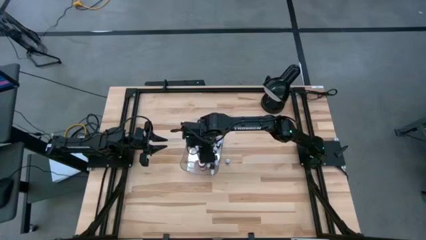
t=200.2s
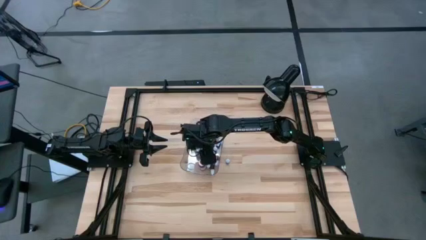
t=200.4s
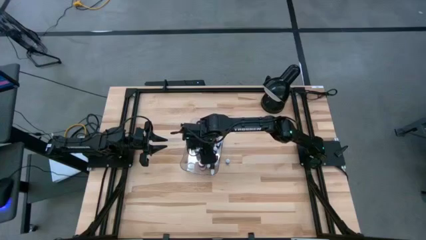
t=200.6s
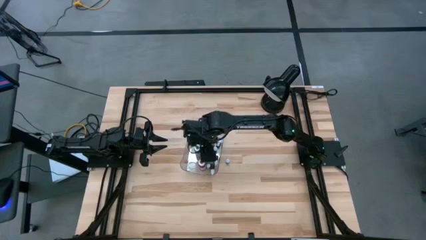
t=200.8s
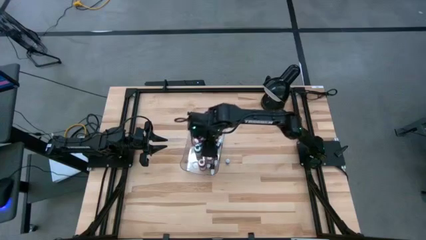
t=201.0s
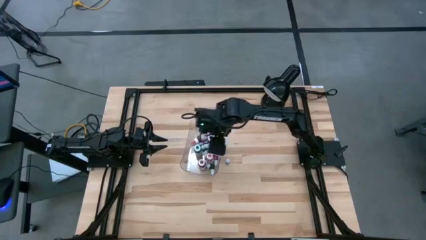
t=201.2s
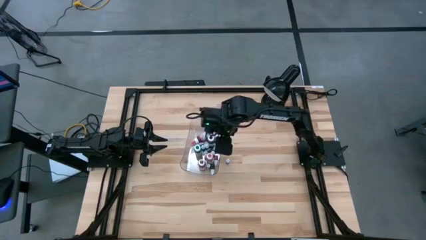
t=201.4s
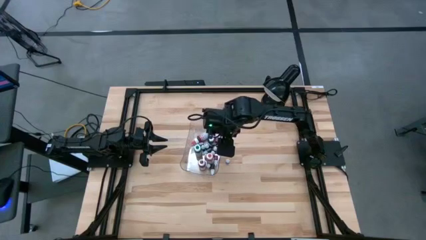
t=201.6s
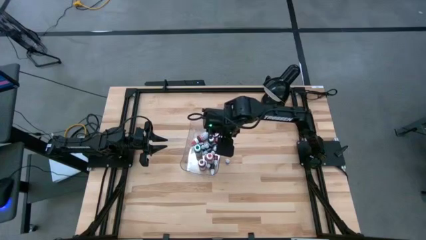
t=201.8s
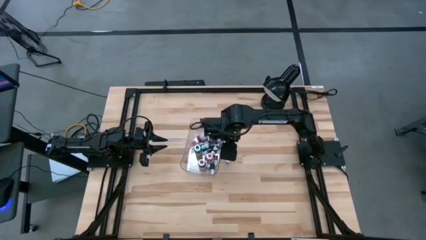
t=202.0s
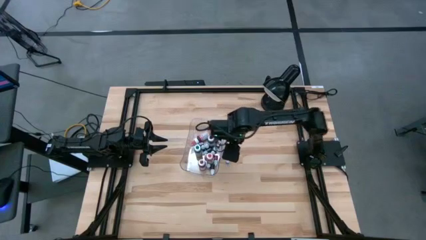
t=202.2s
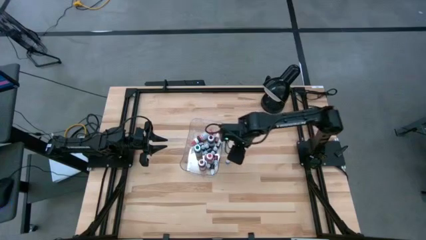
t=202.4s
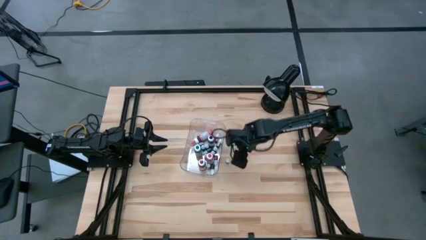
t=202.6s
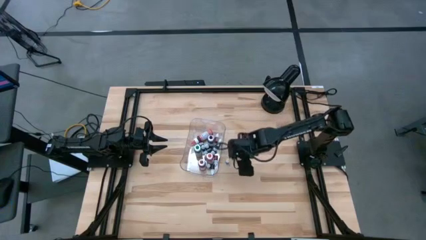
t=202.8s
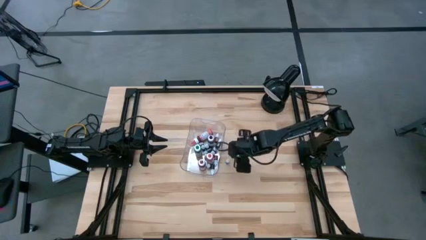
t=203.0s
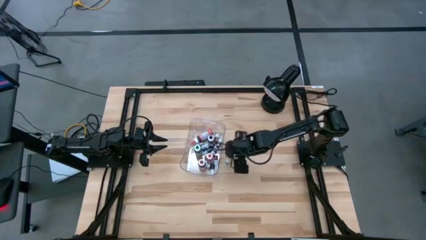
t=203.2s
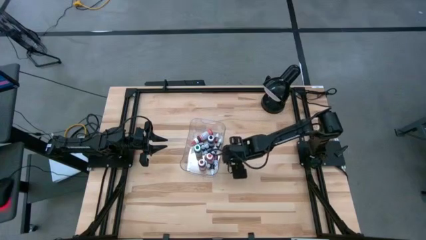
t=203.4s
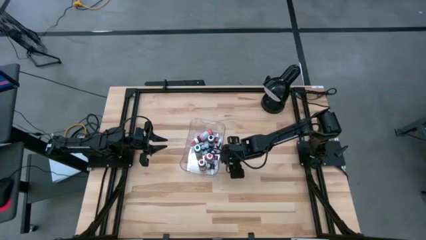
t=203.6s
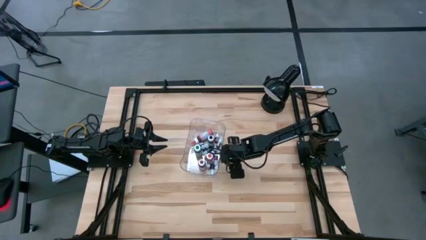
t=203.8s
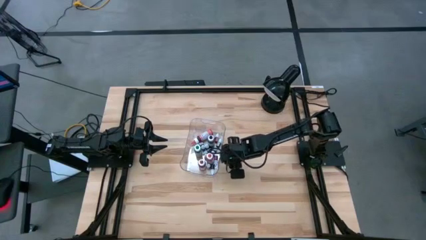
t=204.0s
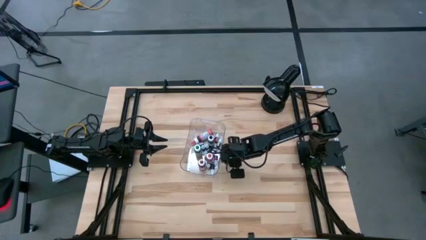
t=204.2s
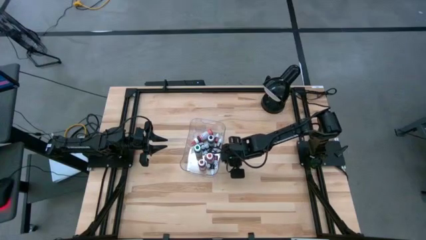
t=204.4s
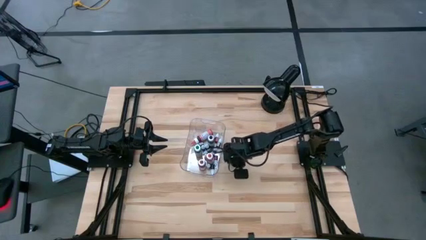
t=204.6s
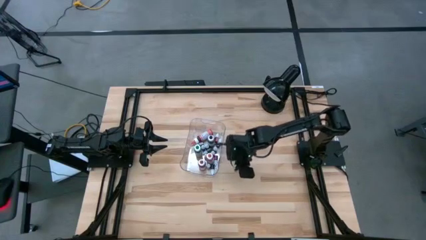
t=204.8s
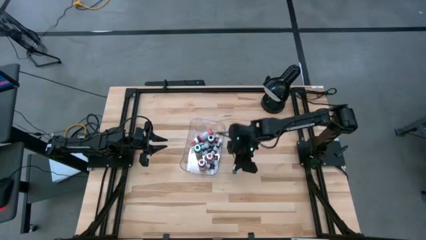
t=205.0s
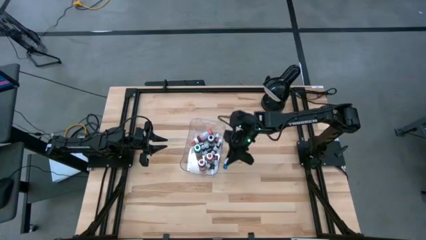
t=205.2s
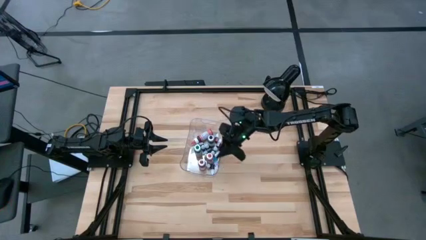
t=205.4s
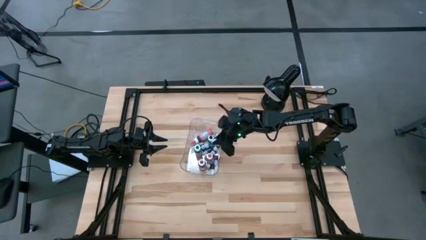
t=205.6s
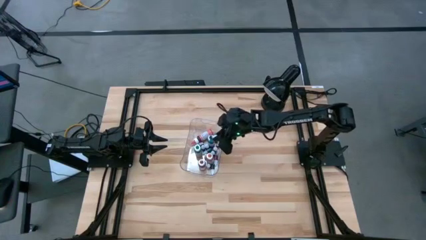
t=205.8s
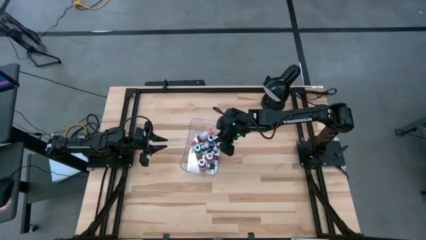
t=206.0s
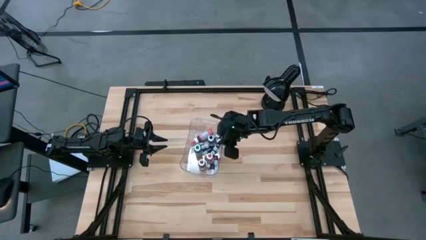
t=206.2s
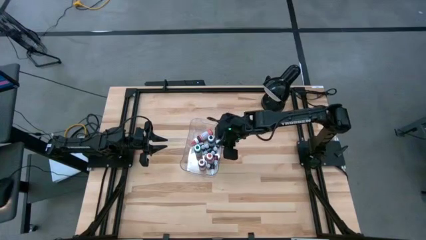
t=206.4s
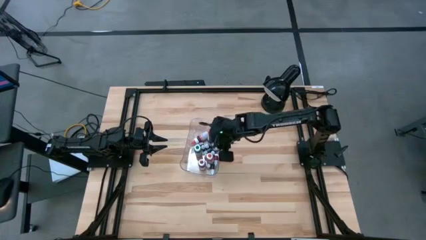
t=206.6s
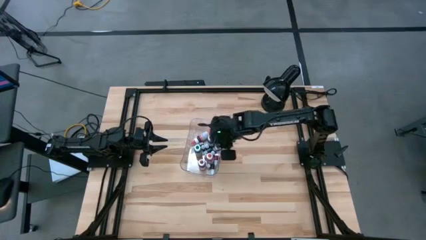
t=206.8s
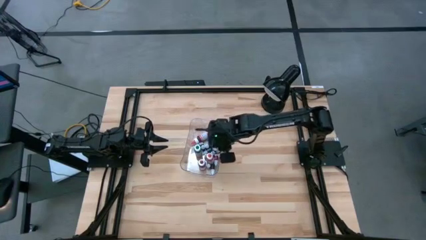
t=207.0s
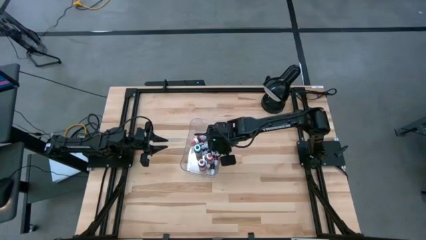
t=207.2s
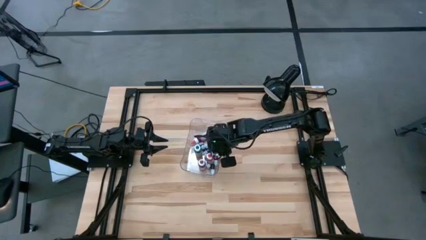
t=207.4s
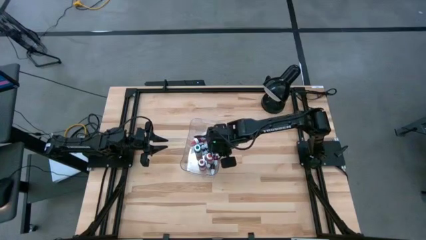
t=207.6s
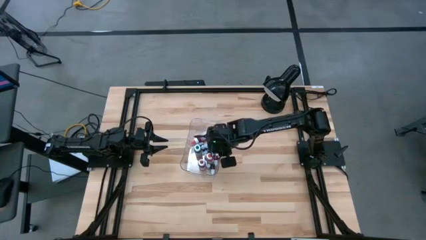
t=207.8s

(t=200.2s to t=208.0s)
Task: Pick & Place food coloring
Put the small blue food coloring bottle into the transparent bin

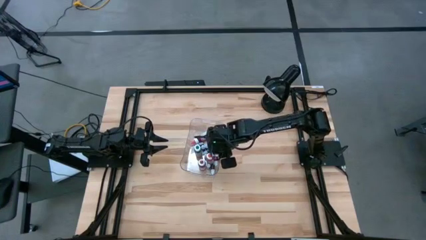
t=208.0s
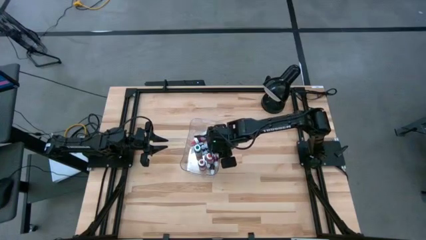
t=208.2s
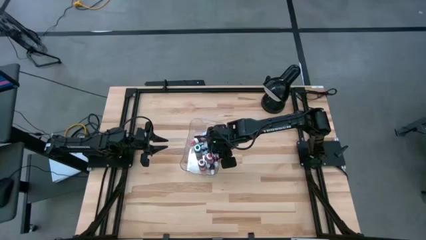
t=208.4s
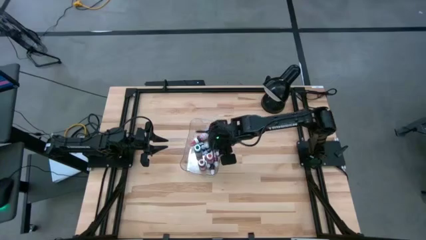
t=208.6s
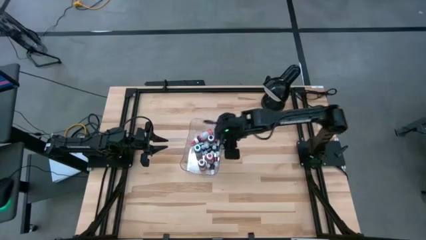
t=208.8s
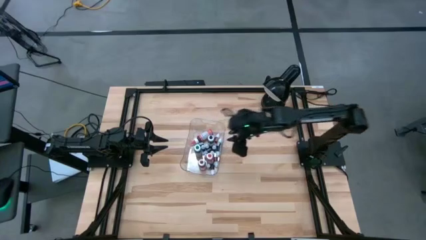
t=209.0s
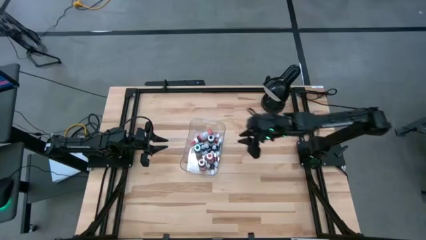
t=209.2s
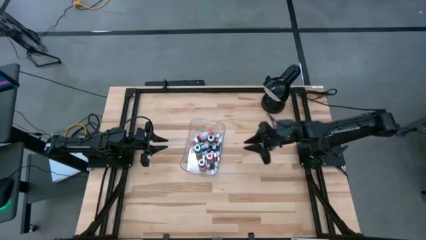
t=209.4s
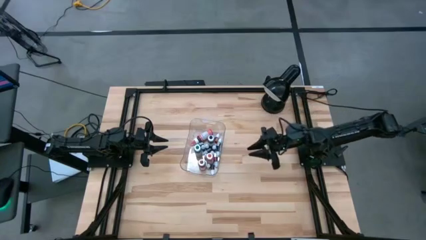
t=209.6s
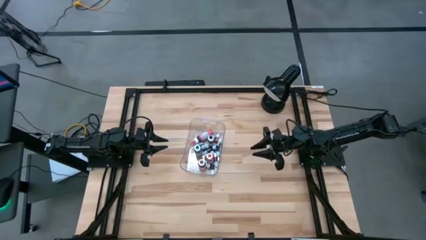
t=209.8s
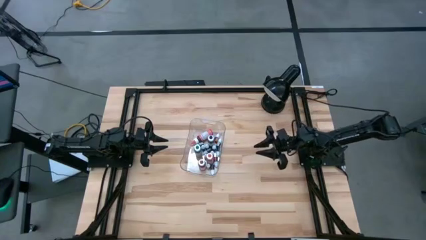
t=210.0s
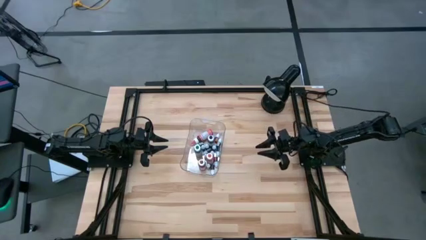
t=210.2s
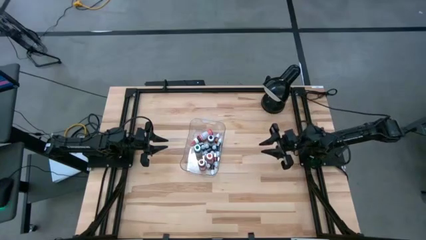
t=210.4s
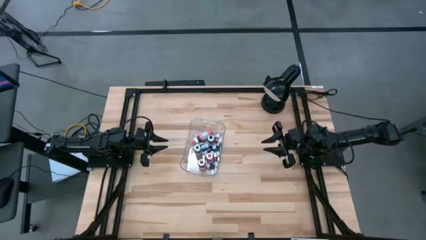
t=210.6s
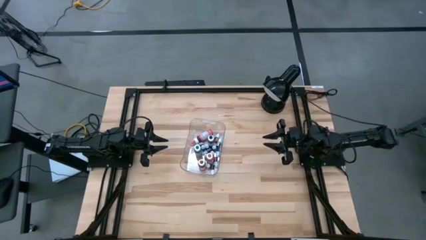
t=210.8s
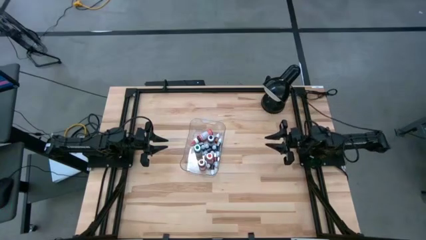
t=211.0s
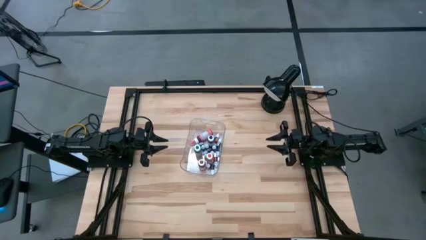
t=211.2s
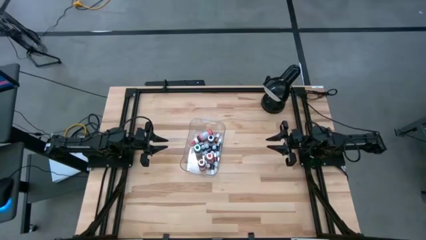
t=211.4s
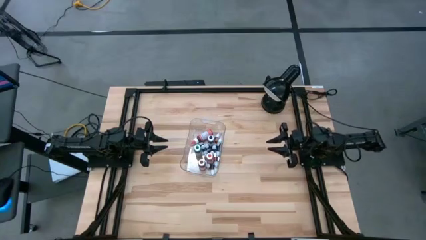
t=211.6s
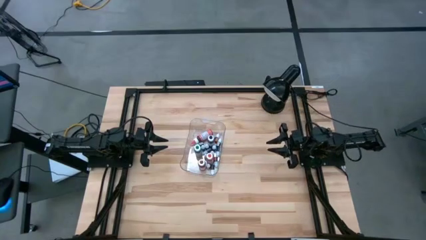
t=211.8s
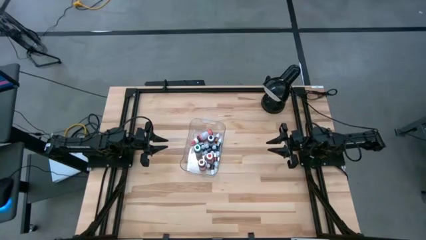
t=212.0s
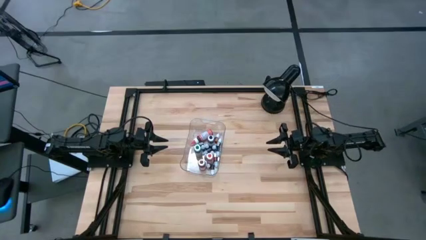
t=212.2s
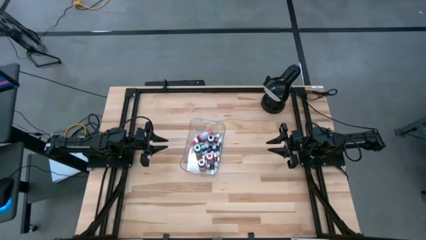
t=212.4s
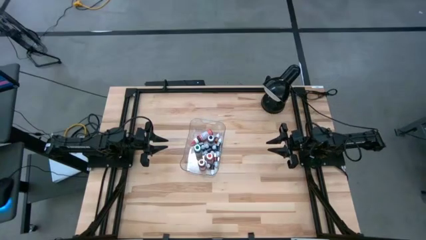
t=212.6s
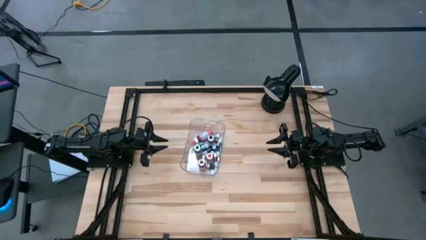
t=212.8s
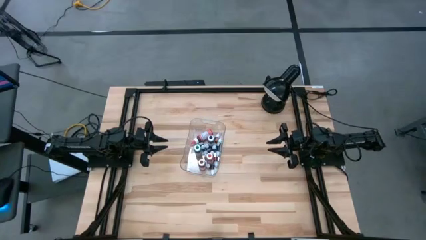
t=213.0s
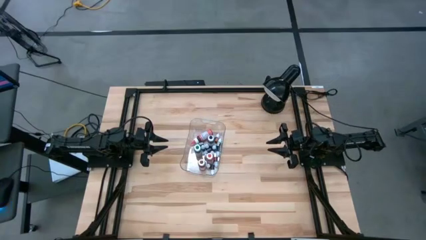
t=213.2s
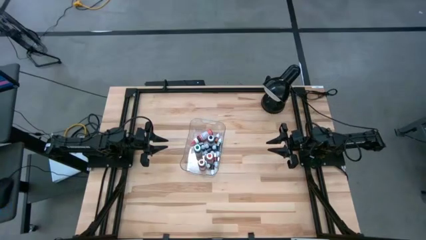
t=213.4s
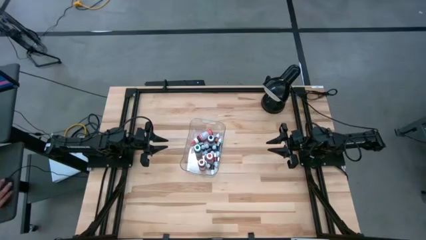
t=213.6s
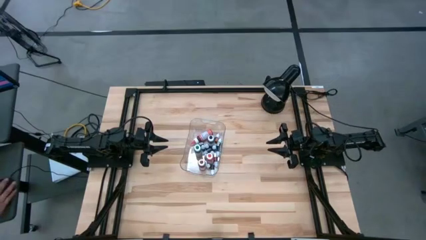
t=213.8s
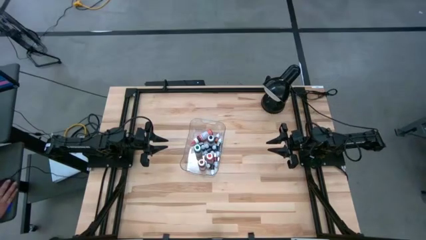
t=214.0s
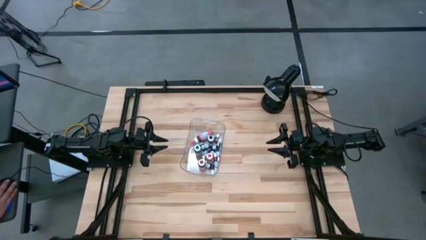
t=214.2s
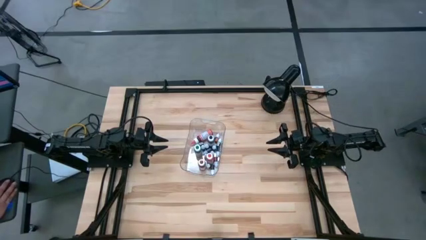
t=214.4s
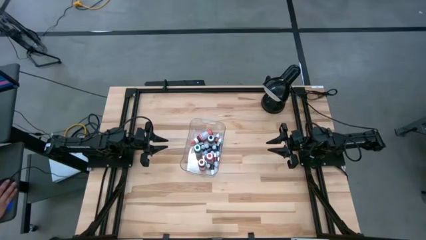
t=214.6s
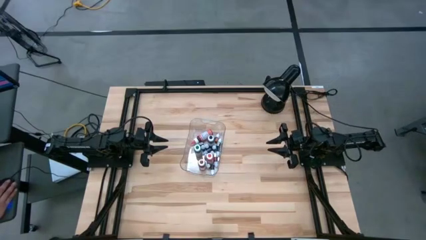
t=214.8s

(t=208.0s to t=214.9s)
Return to Home Position

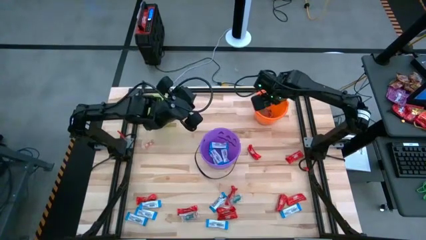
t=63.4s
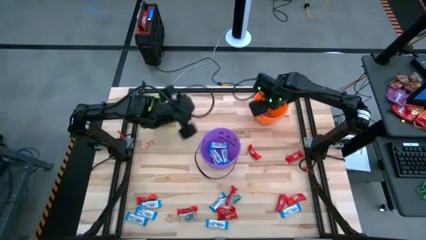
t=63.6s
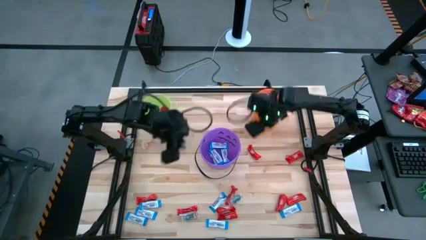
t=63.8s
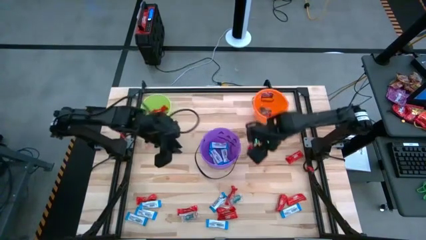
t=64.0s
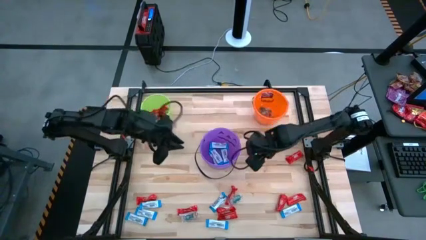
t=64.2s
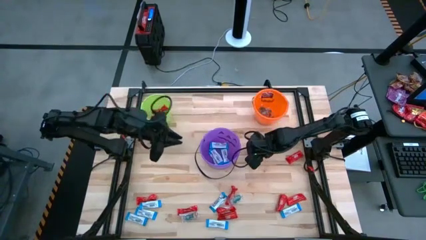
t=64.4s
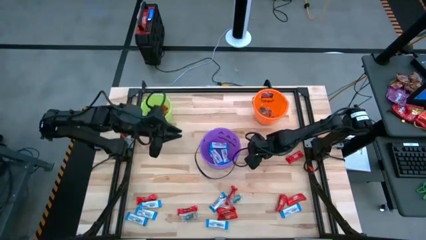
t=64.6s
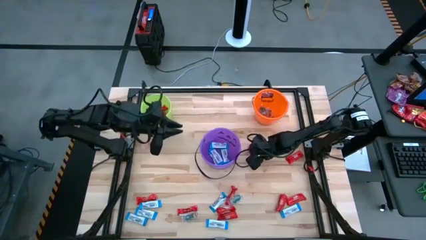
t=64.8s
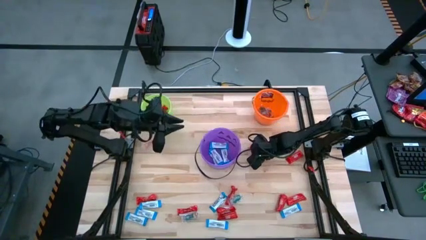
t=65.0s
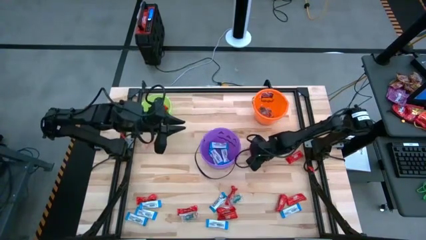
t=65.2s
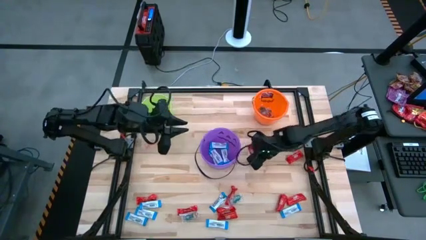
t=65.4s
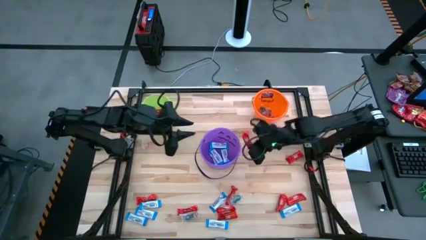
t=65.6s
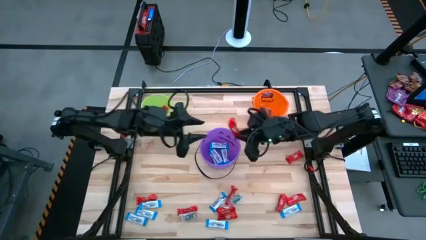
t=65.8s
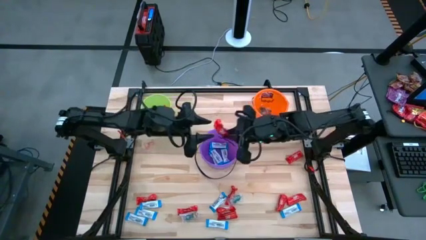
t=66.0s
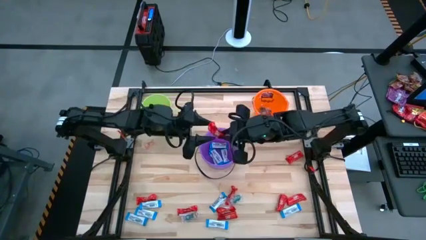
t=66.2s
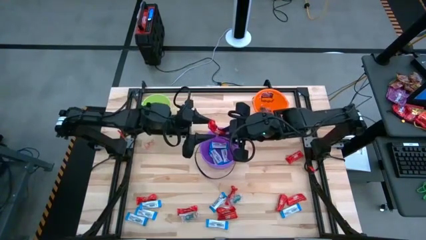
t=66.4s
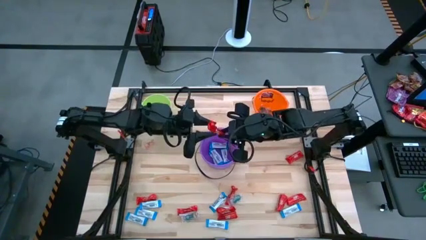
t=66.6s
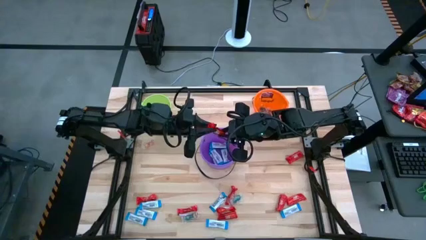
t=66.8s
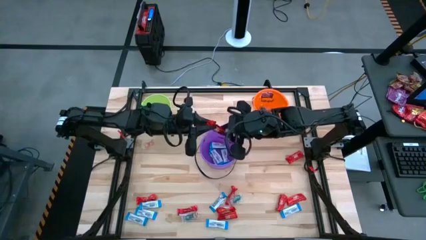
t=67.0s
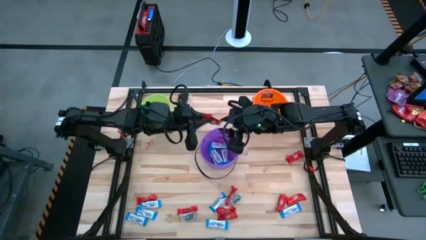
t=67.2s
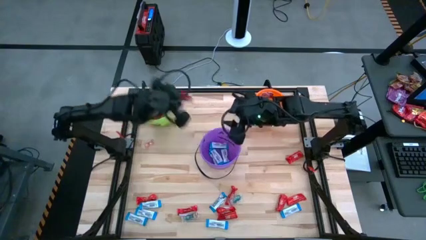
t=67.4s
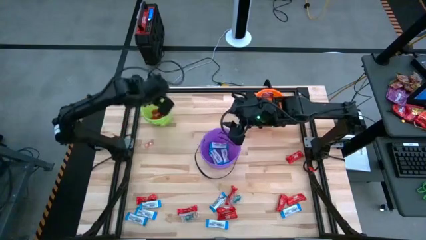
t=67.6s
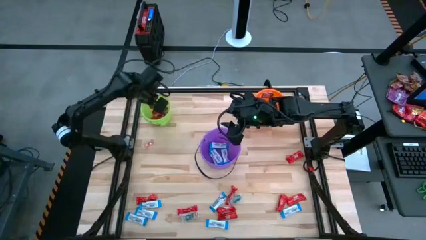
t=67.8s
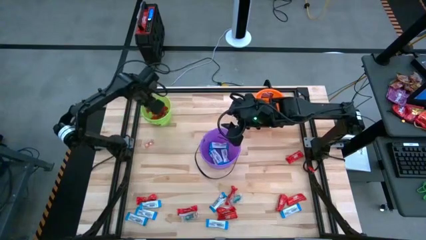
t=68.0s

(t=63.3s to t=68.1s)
Task: Sort candy by brand, put in halloween buckets
Put the red chocolate into the green bucket
